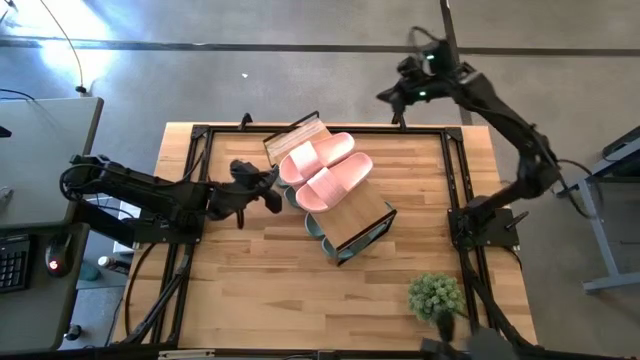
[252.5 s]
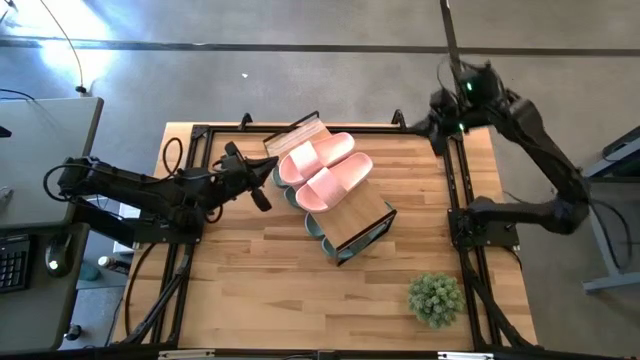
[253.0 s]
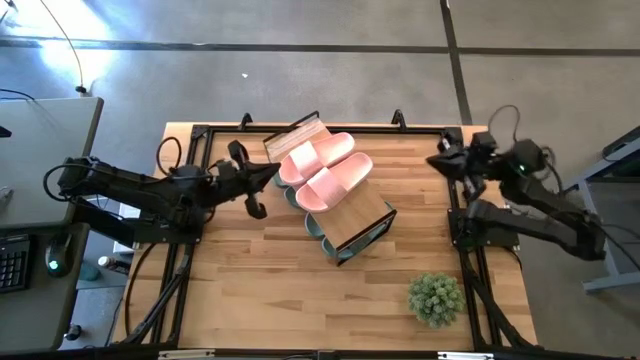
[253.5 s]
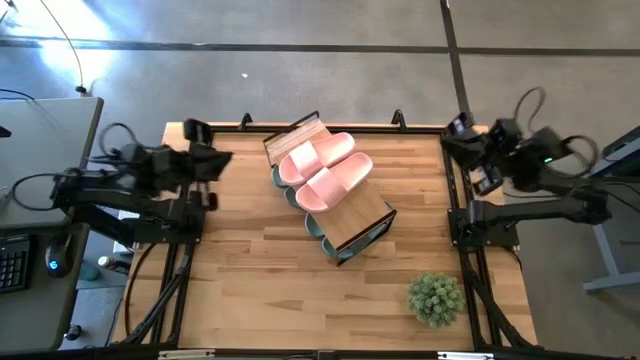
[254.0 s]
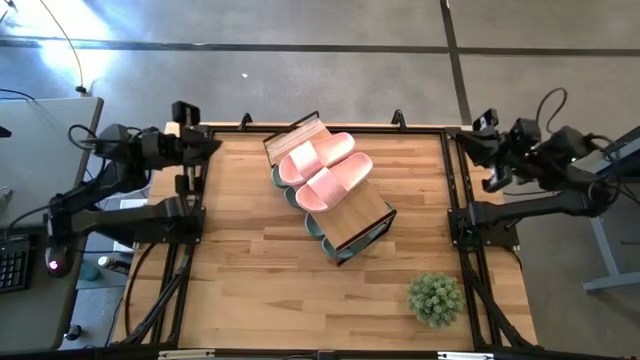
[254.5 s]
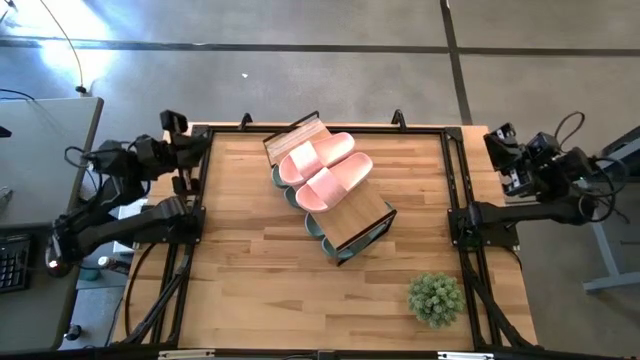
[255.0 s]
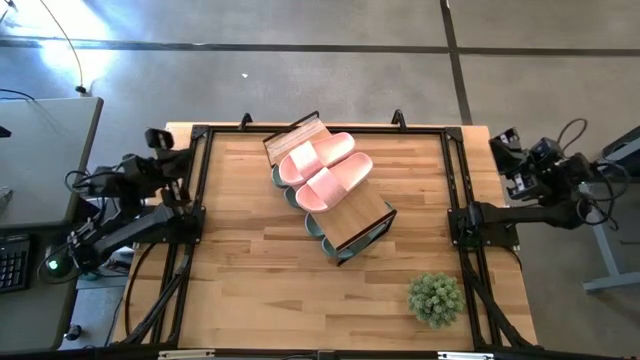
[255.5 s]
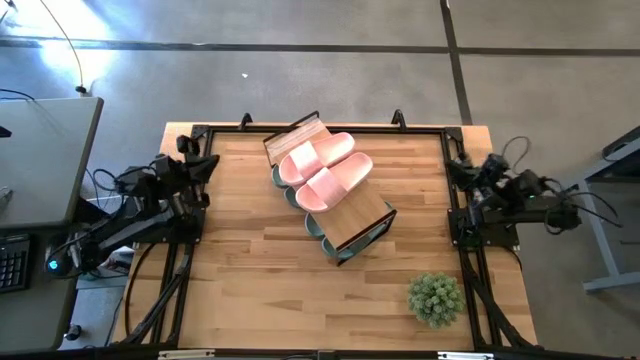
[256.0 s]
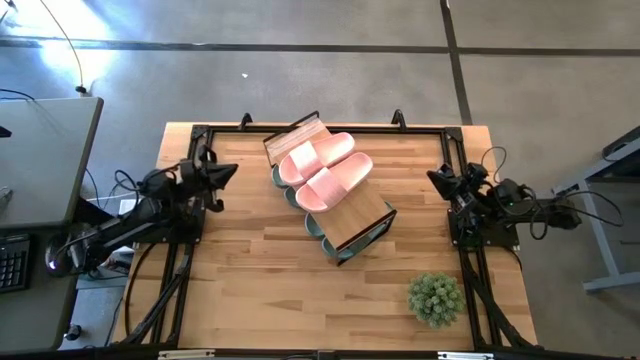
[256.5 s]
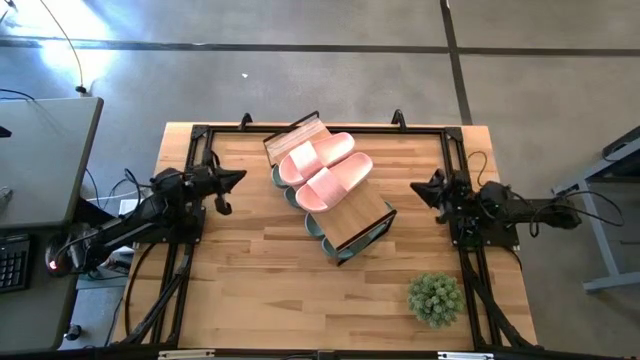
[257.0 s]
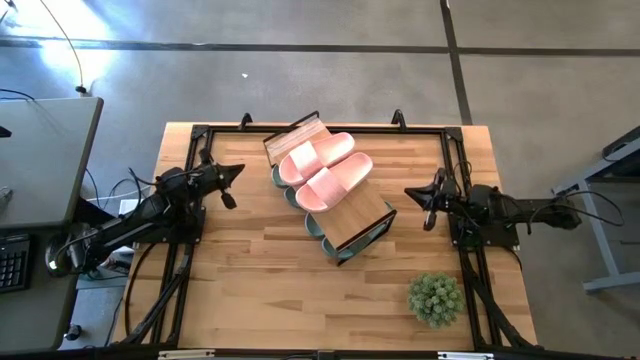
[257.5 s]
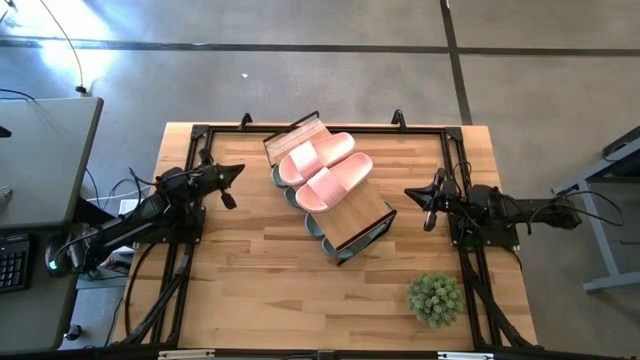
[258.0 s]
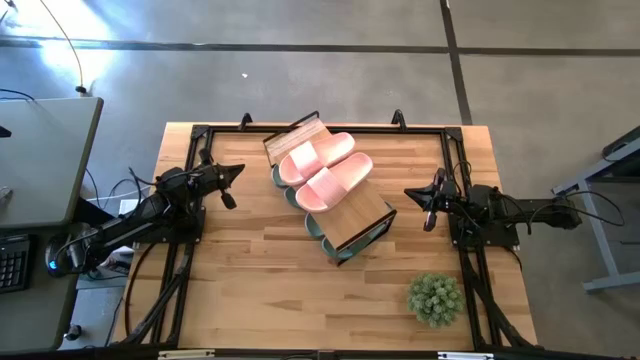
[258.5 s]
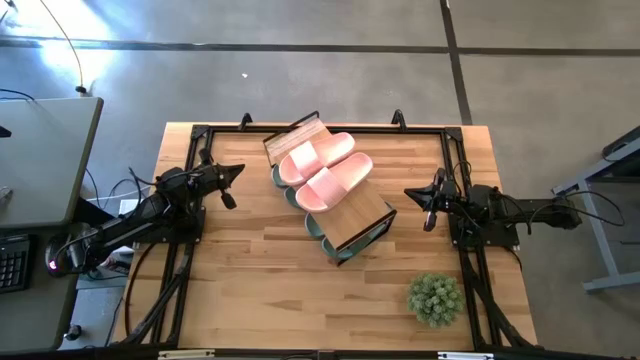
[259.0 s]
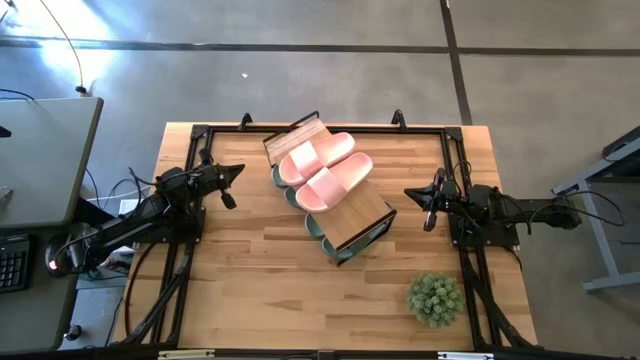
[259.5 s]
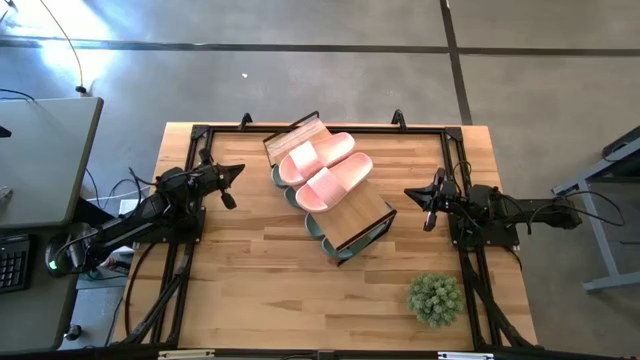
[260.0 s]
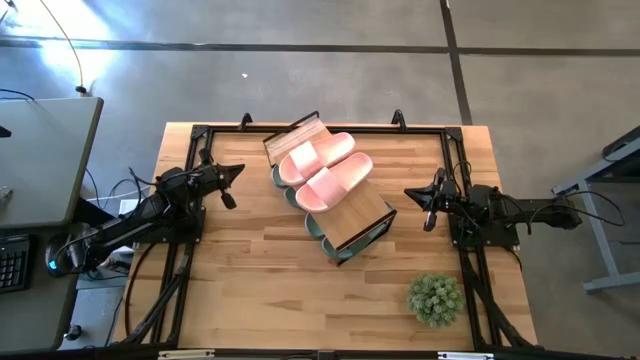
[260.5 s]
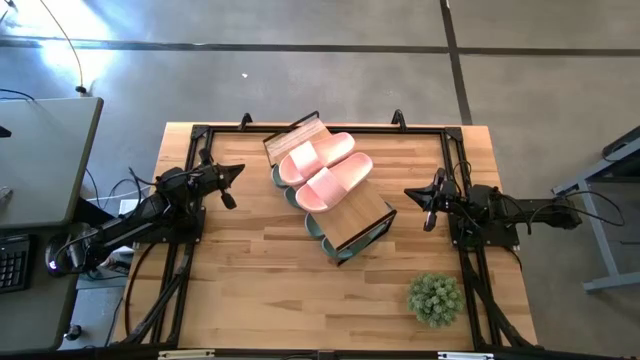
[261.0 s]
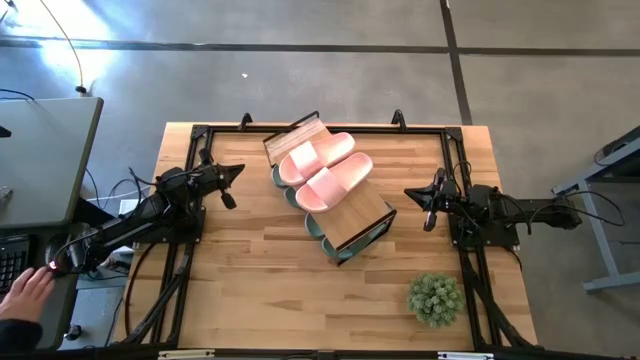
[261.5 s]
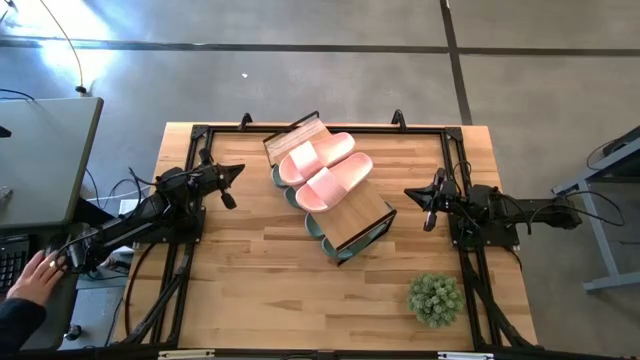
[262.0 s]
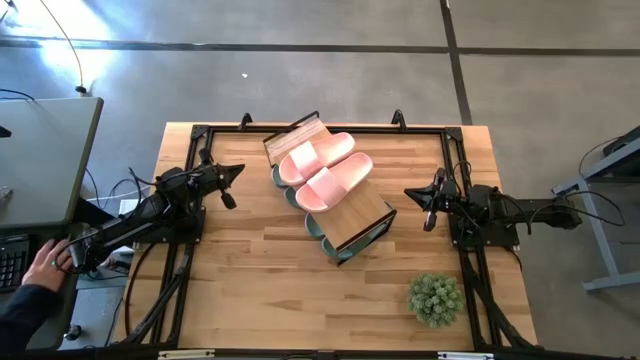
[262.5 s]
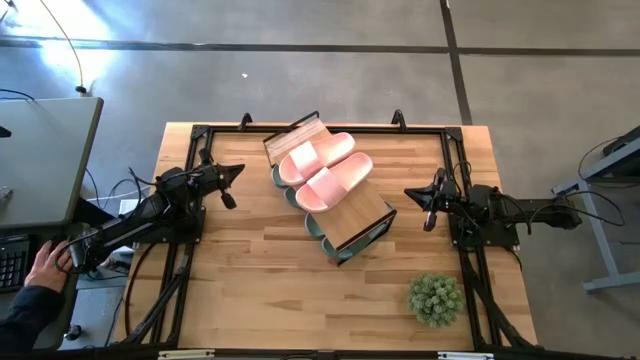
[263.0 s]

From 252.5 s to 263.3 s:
Task: Pick and place slides into the shelf
Return to Home Position

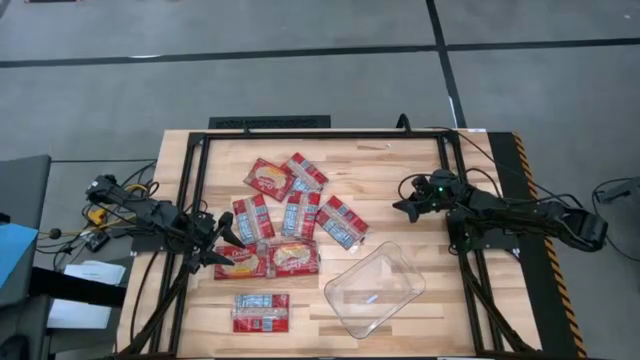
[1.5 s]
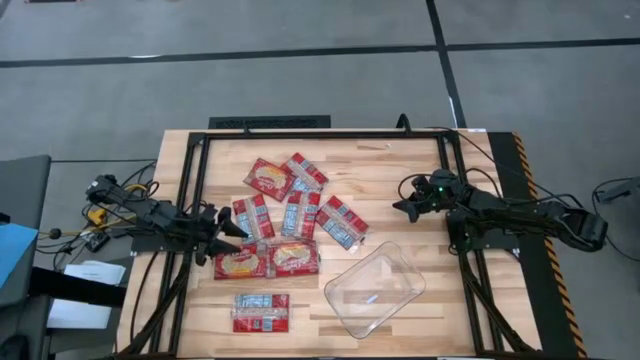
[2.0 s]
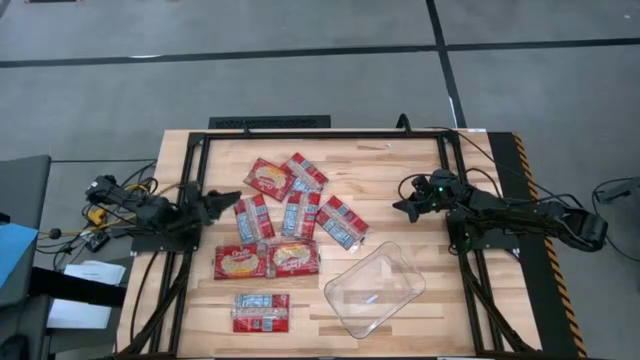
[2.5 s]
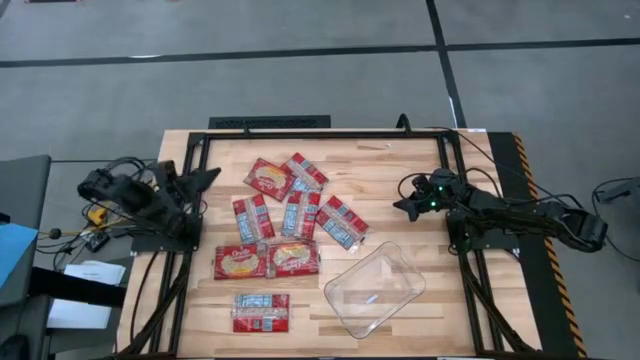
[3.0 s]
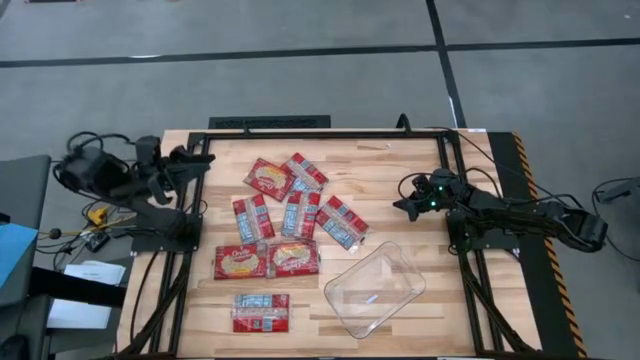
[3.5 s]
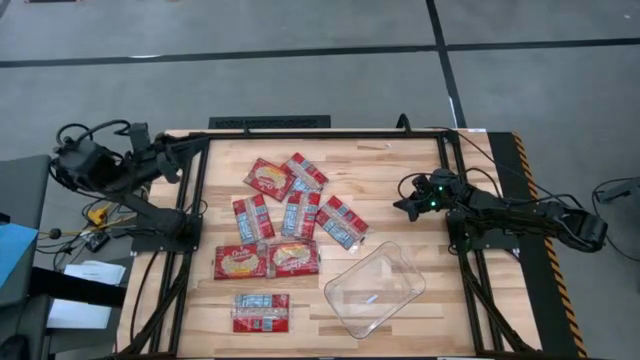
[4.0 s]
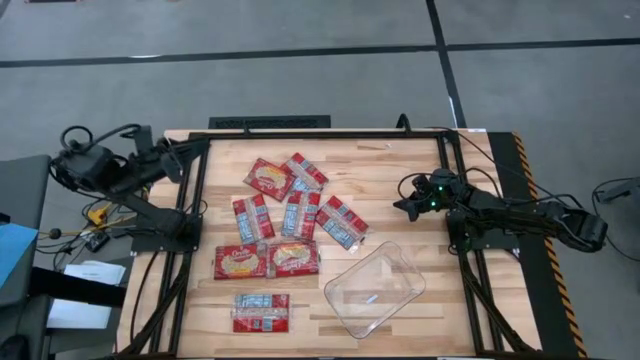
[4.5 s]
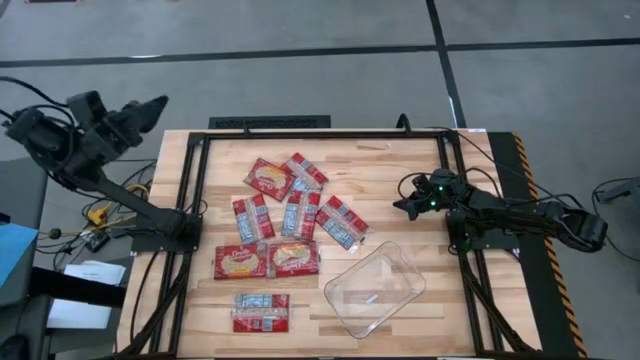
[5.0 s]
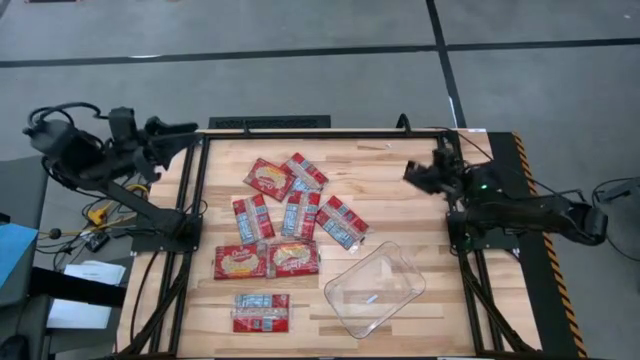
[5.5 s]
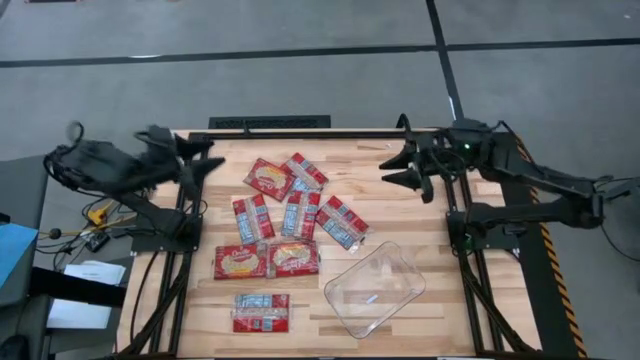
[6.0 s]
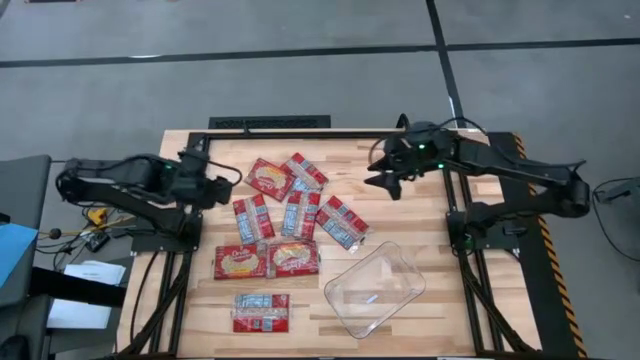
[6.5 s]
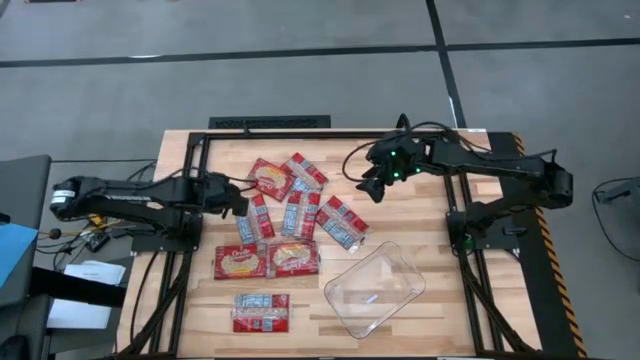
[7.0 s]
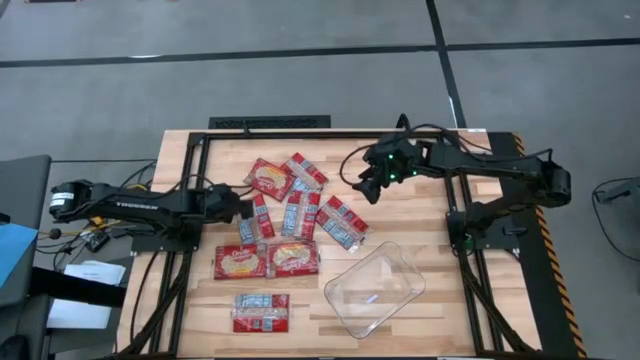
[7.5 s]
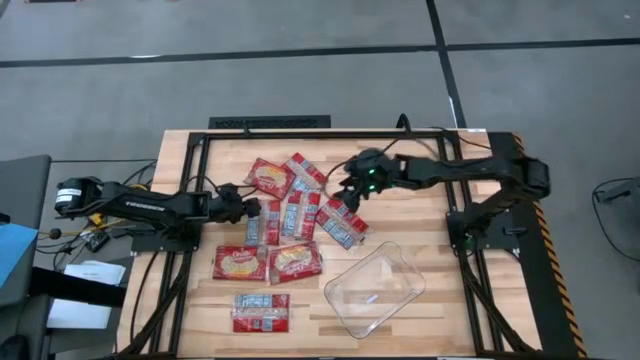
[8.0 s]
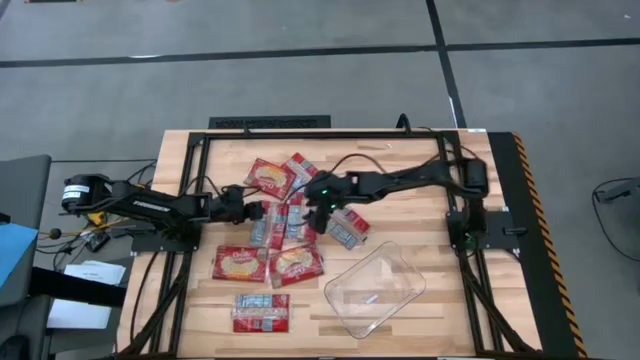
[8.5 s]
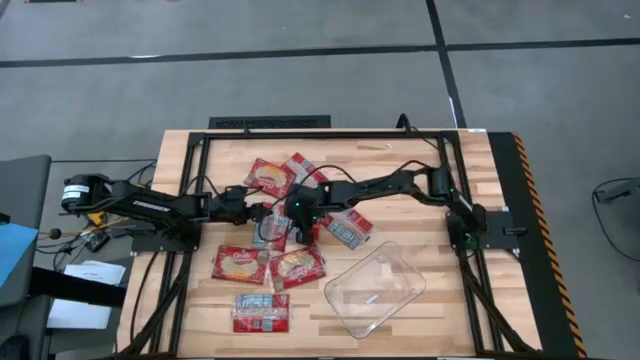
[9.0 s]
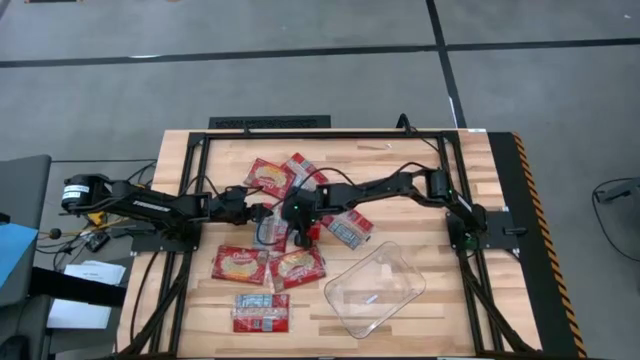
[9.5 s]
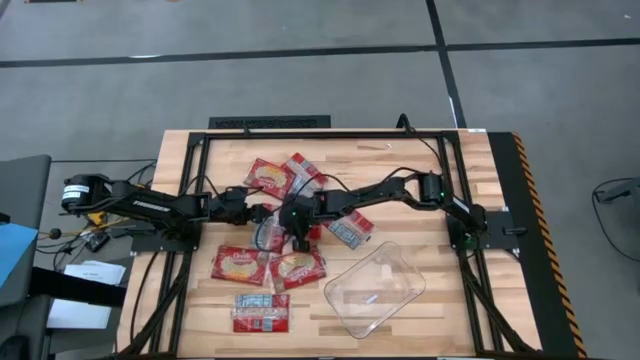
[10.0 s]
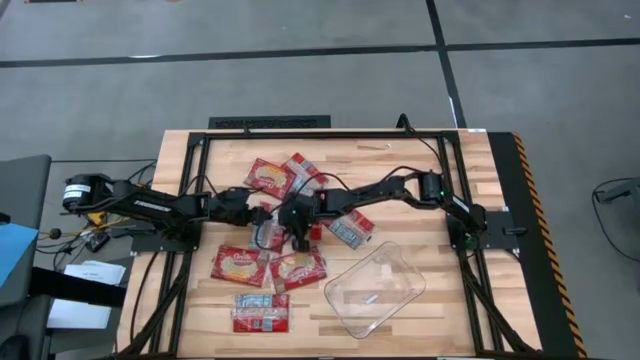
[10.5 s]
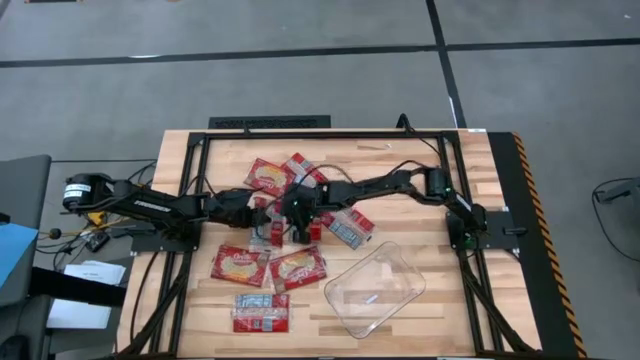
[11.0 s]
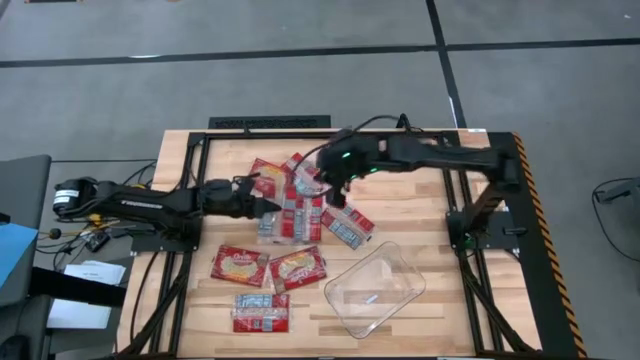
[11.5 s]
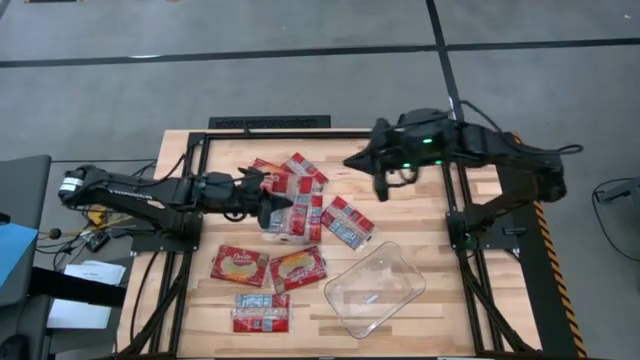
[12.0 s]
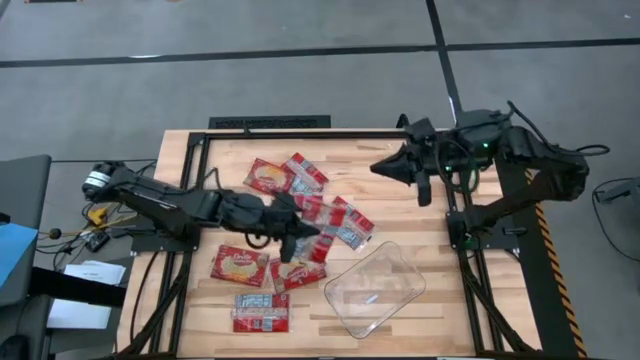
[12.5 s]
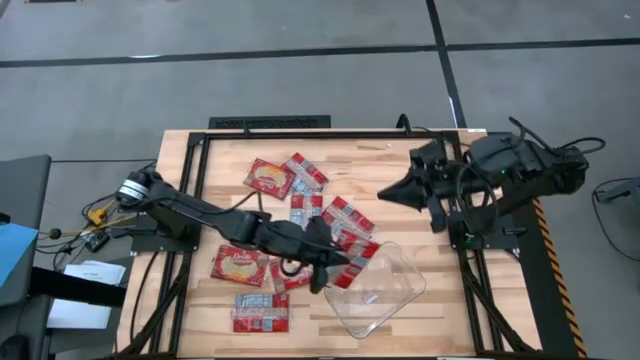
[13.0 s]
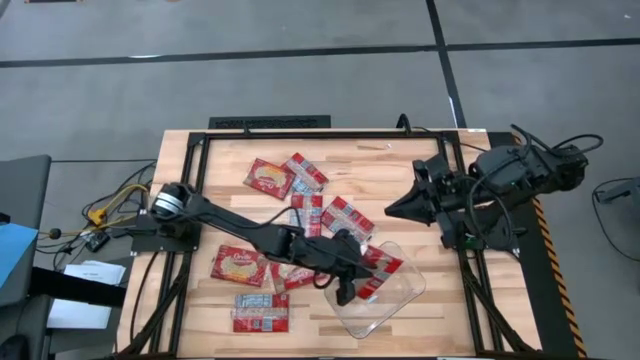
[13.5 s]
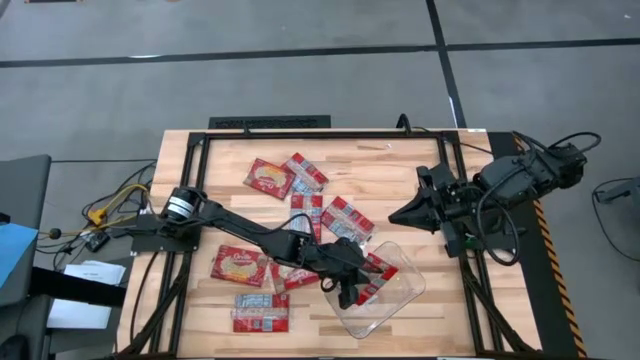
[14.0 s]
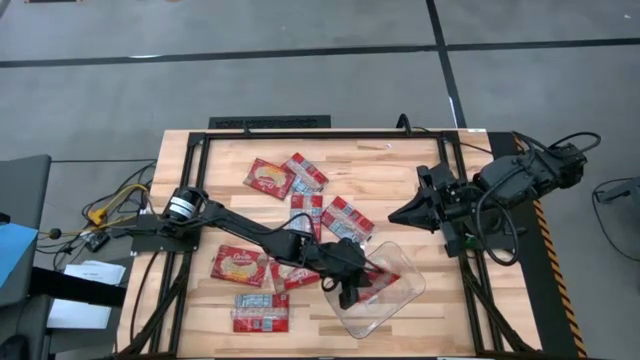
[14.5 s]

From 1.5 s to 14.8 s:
Task: Sort popcorn bags into baskets
Put the red popcorn bag into the transparent bin
